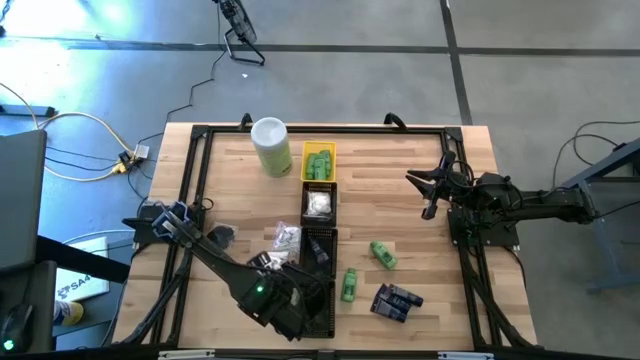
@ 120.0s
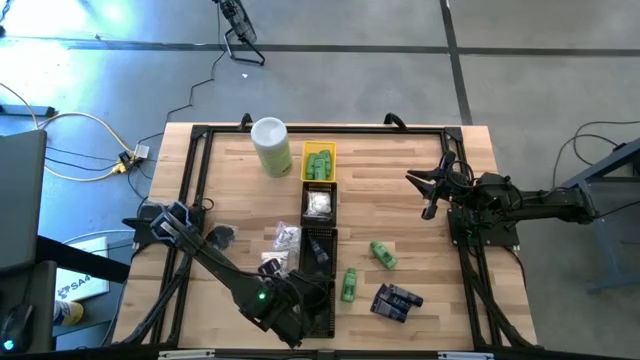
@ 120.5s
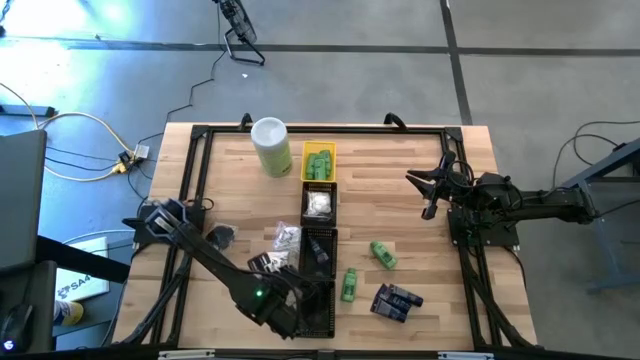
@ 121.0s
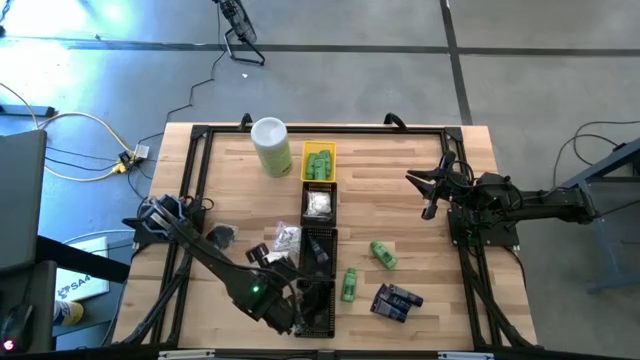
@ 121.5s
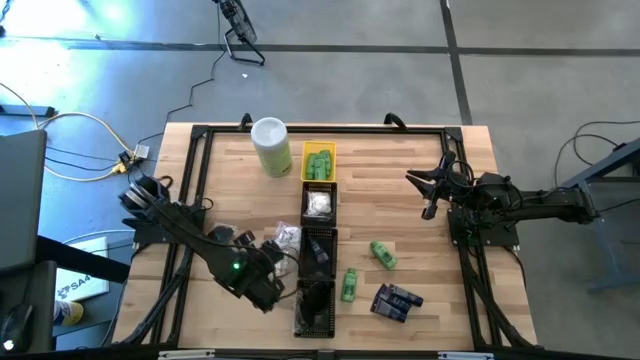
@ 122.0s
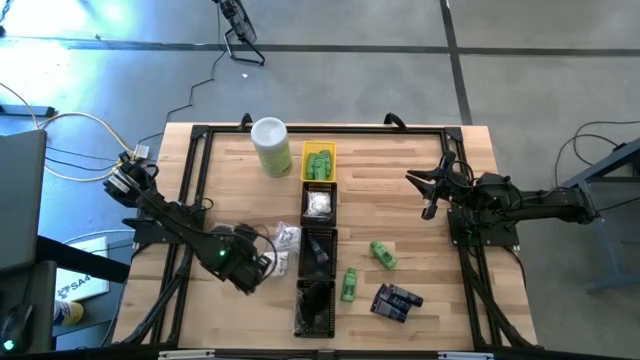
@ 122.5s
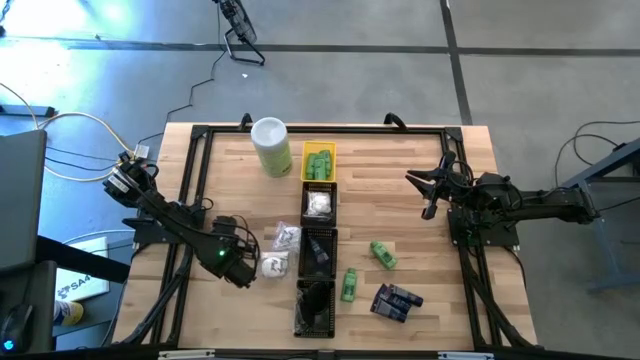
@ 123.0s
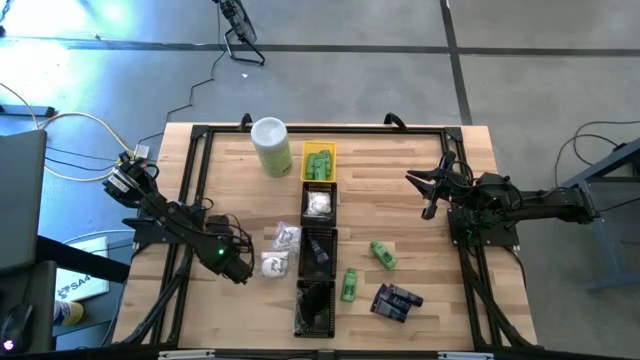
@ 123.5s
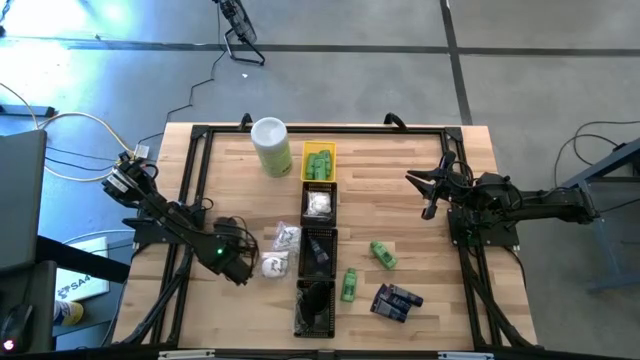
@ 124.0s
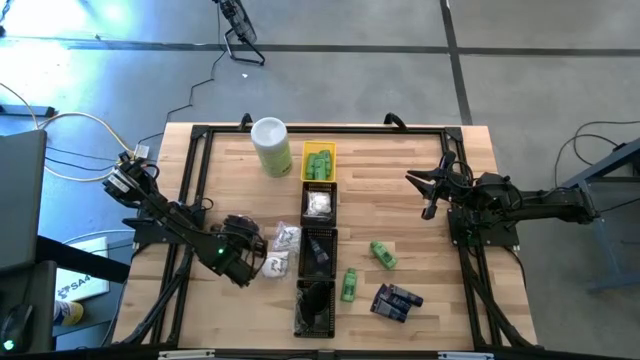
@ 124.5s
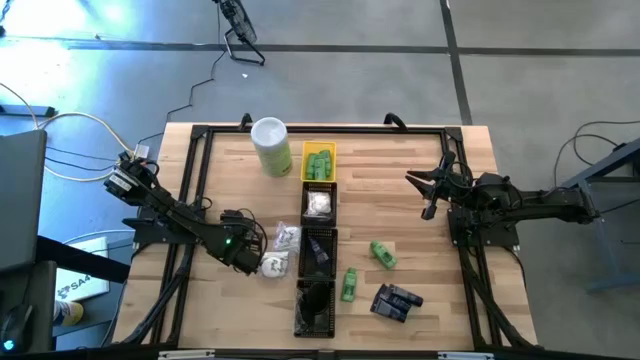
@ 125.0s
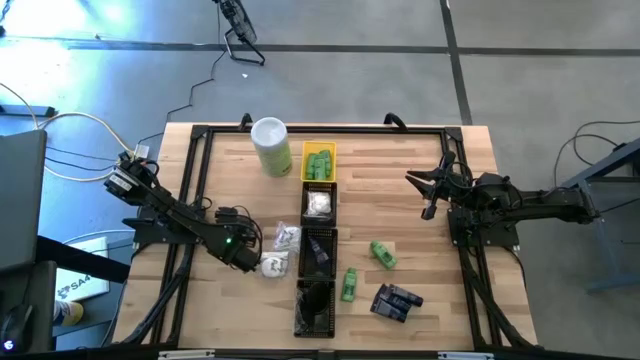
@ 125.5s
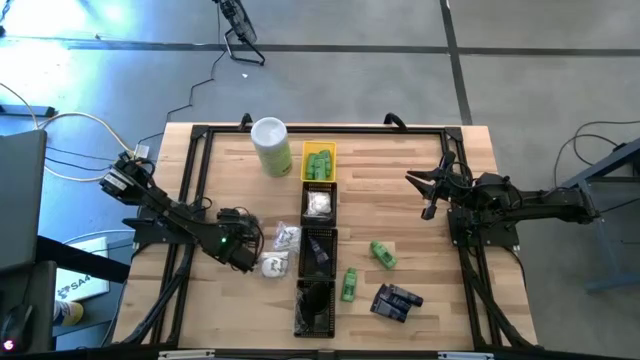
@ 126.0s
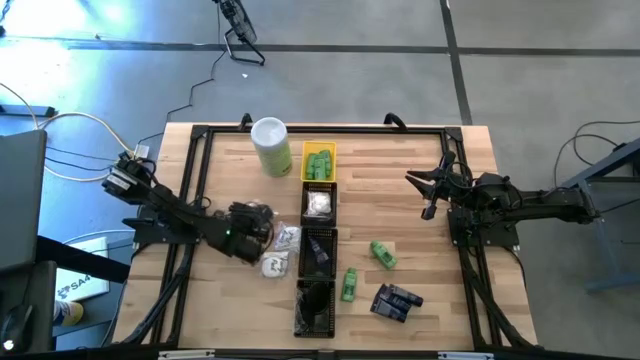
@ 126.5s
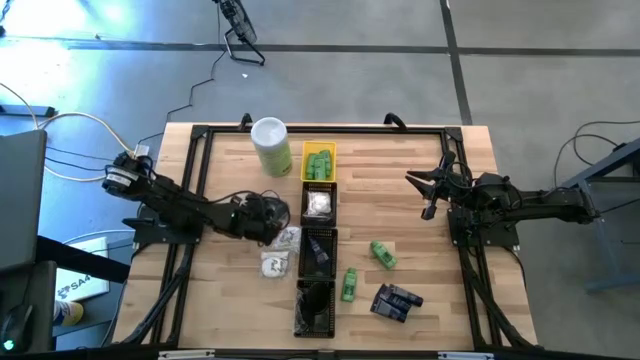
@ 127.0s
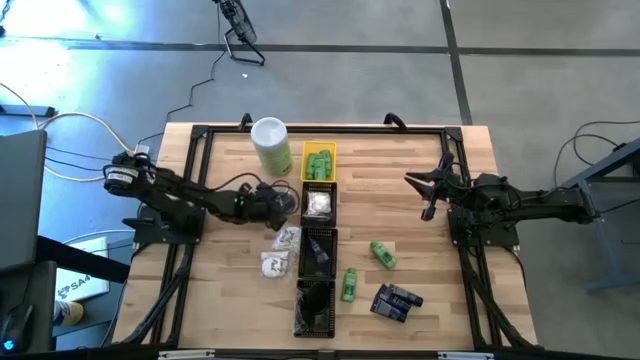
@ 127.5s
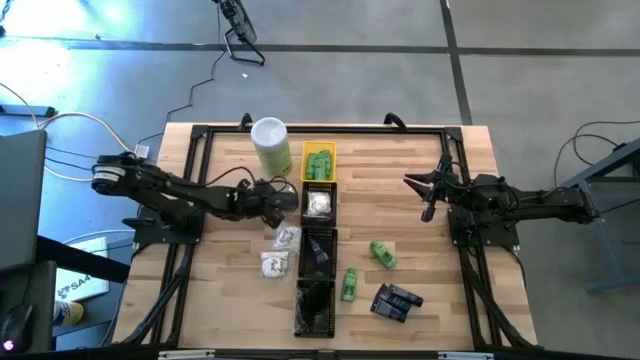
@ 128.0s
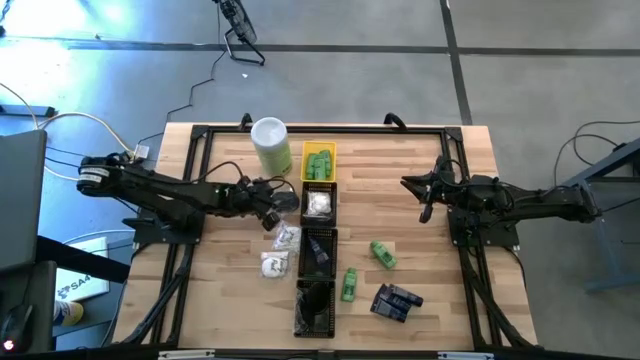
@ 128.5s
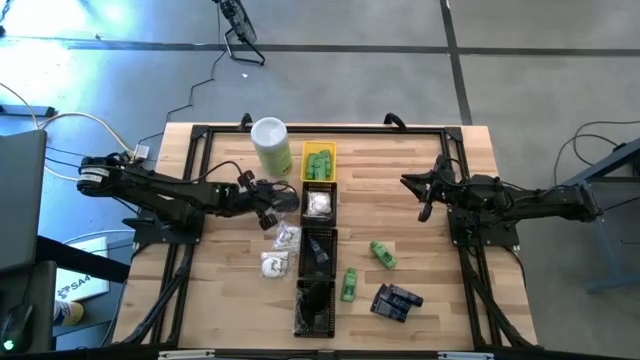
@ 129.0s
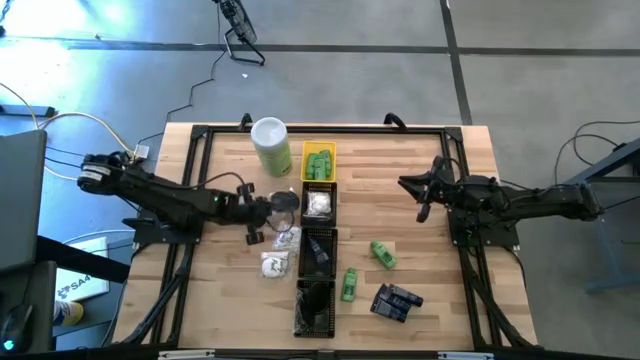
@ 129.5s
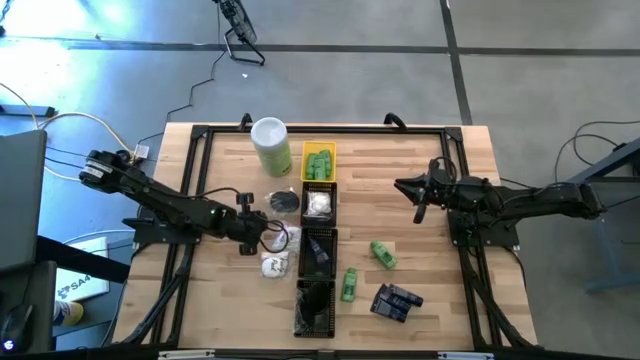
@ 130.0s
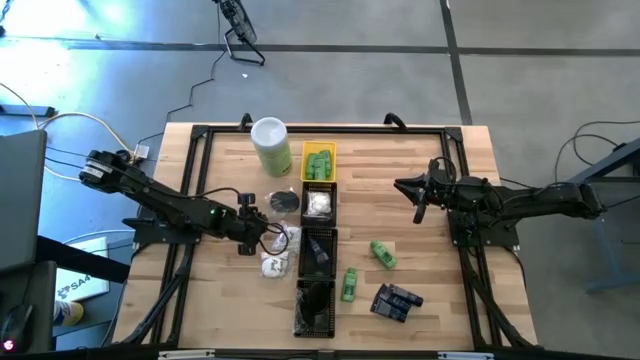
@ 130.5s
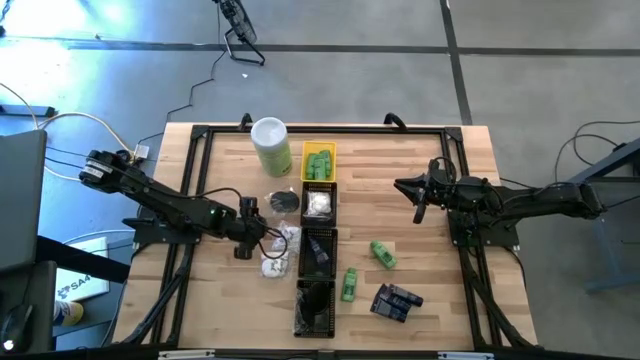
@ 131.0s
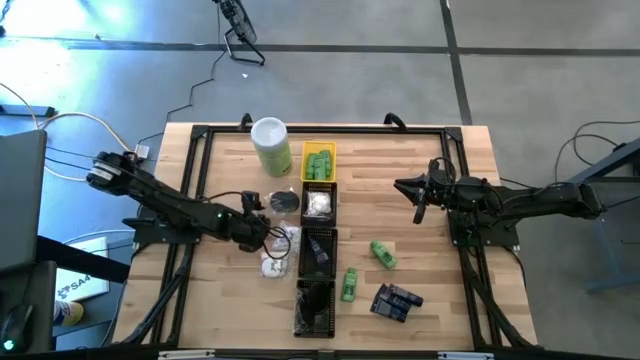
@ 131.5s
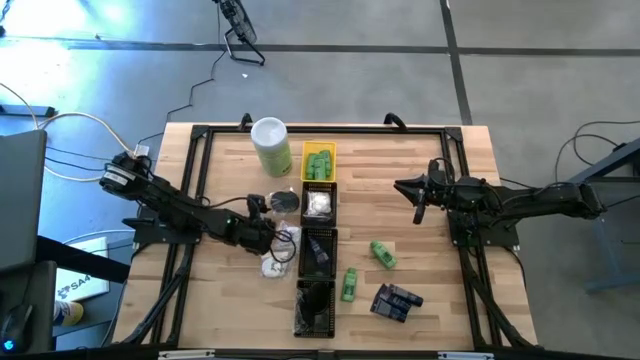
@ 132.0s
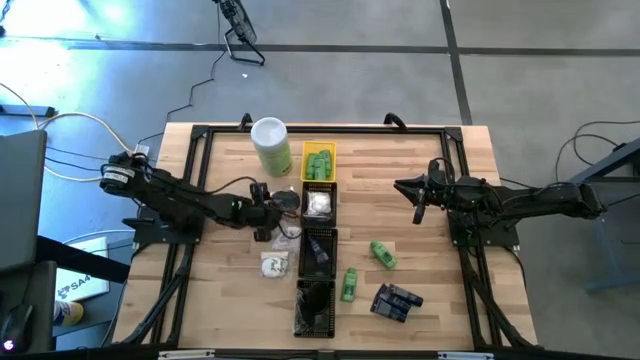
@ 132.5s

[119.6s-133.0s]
Task: Pick & Place Travel size toiletries
Put the black hairbrush into the bottom black basket

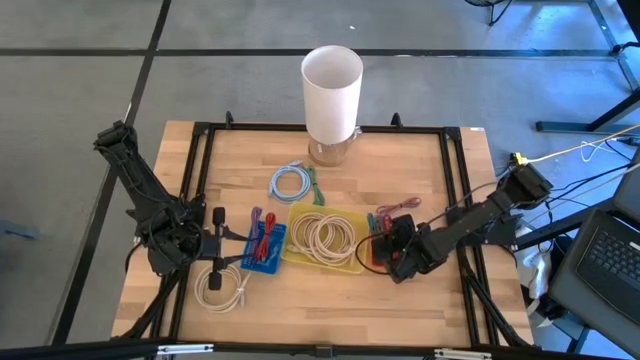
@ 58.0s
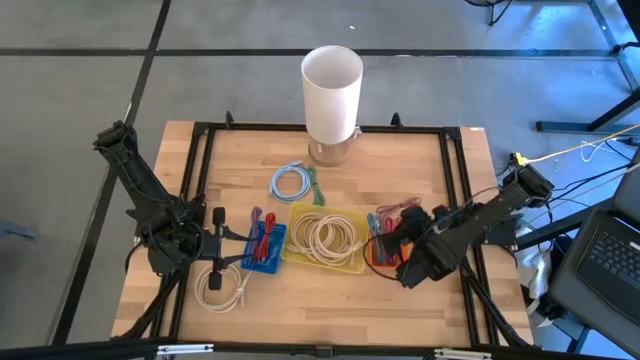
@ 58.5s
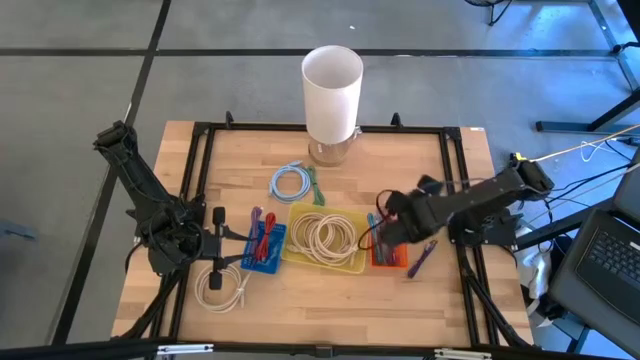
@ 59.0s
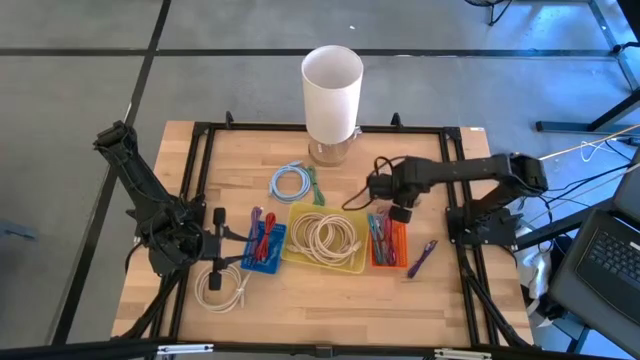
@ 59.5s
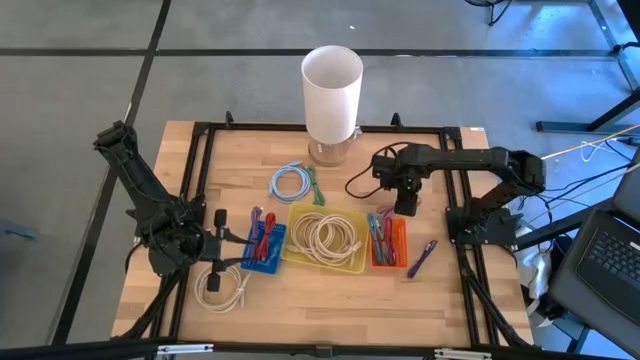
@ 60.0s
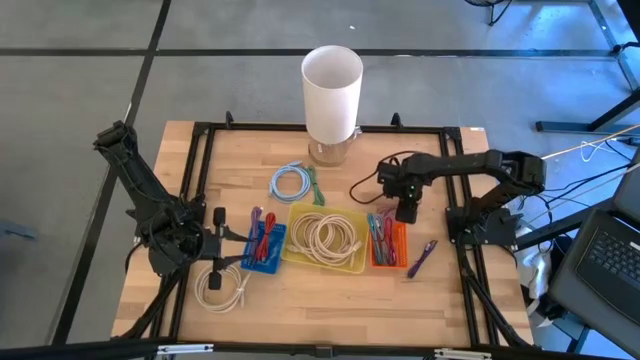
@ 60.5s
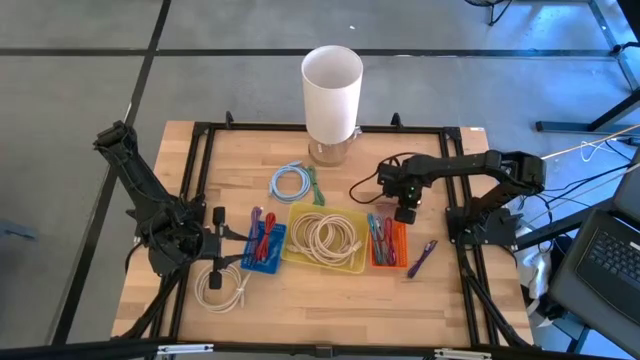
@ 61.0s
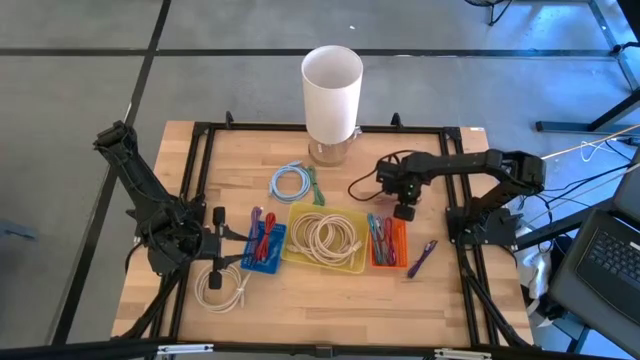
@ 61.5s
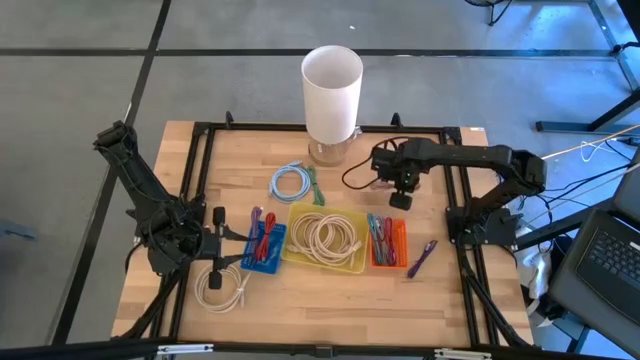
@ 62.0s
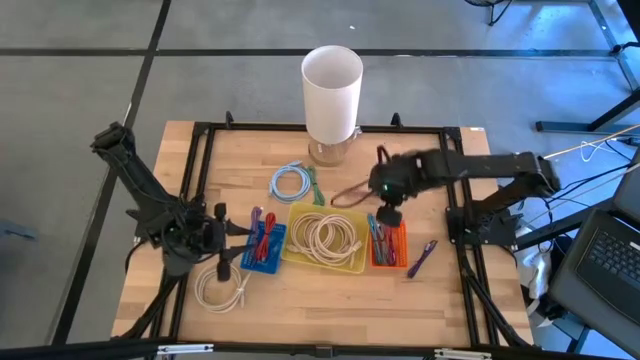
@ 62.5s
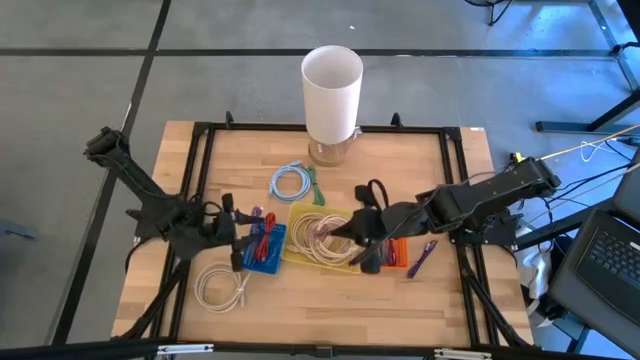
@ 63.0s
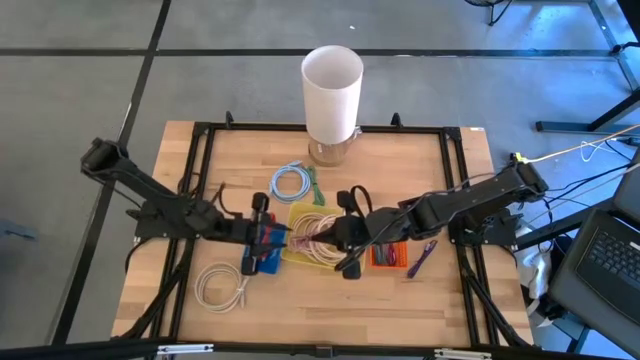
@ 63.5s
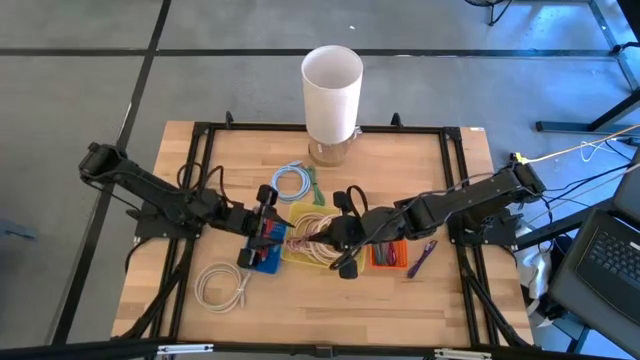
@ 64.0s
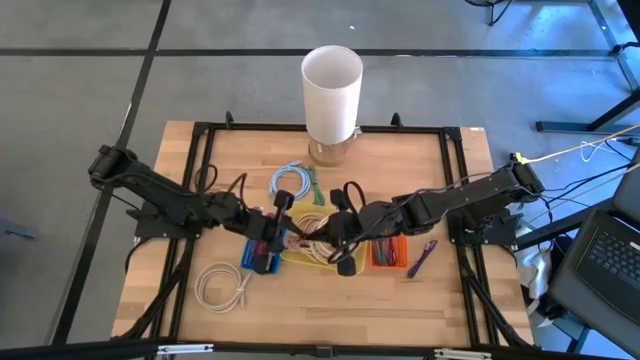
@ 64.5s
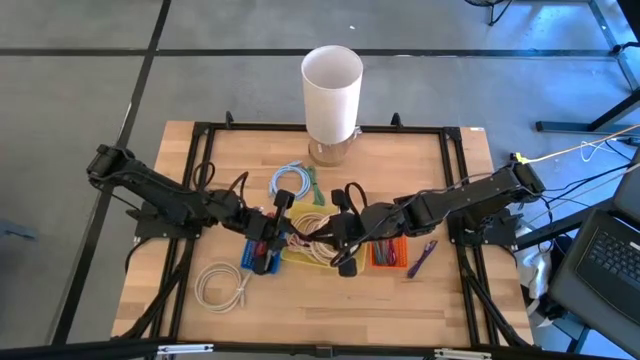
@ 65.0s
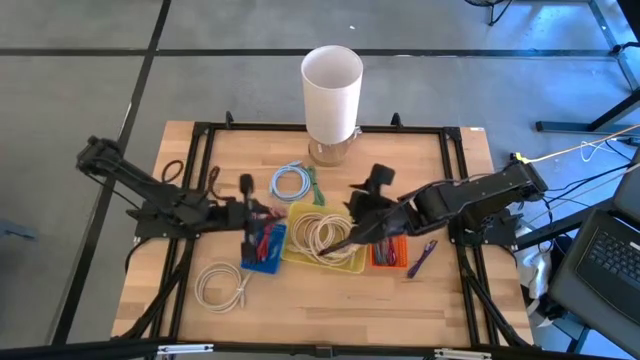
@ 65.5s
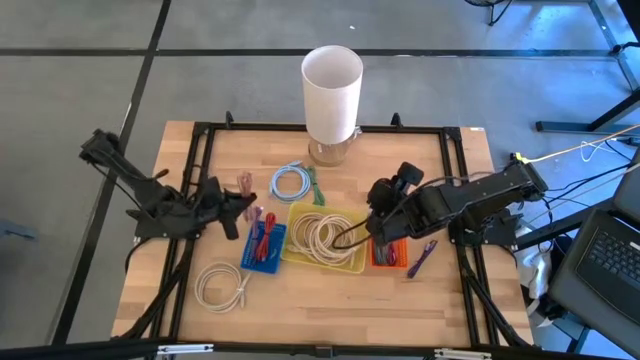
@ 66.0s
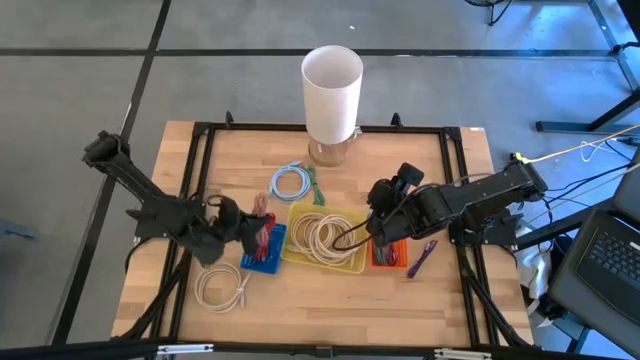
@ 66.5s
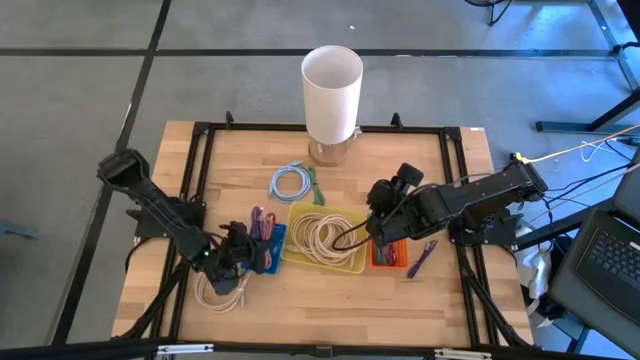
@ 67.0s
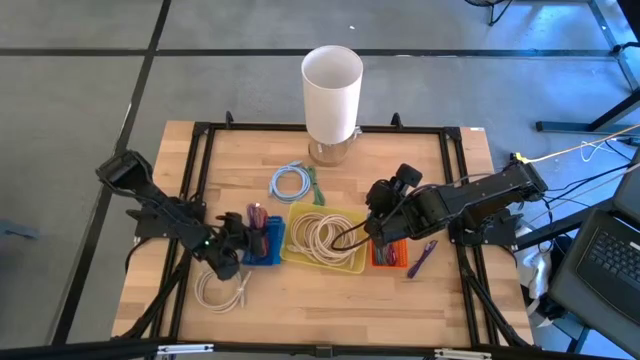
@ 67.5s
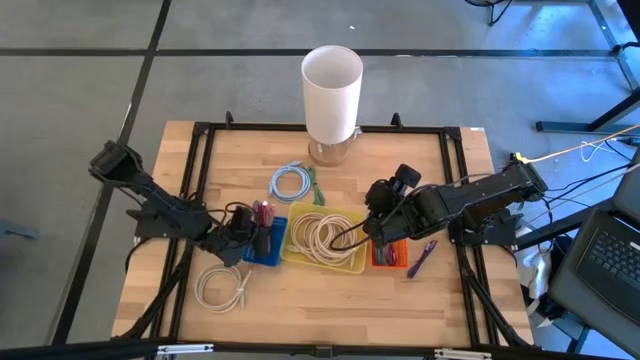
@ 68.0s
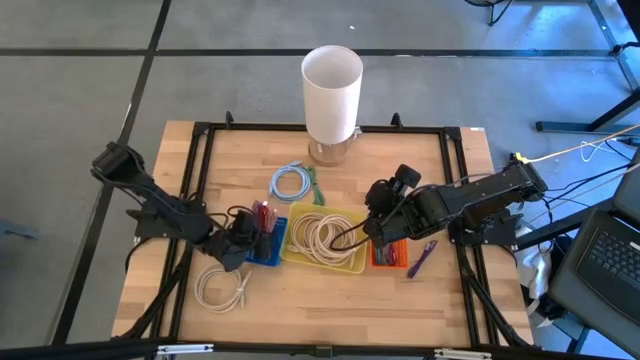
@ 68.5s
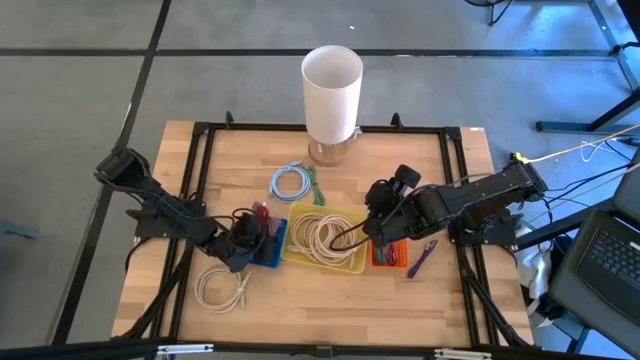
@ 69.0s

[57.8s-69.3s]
Task: Pick & Place USB Port
Put the pink charger cable into the blue bin
